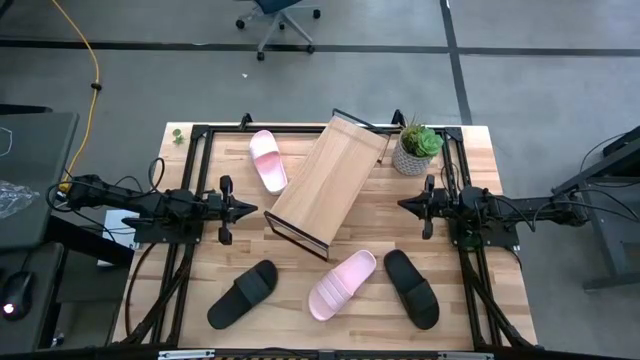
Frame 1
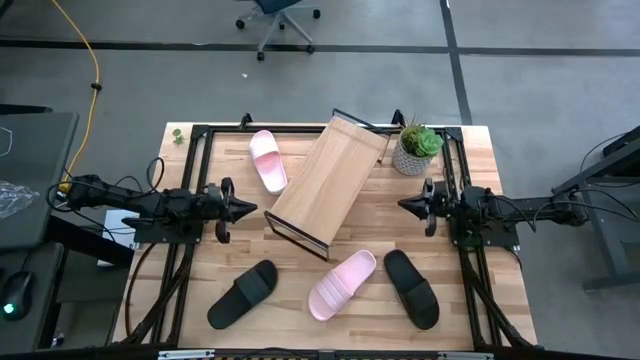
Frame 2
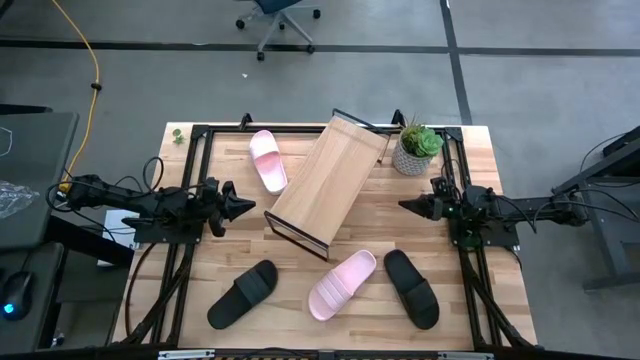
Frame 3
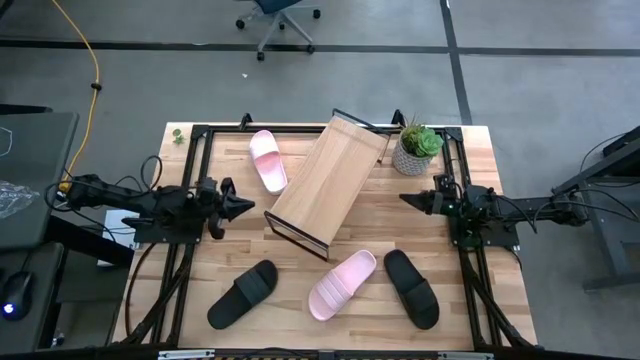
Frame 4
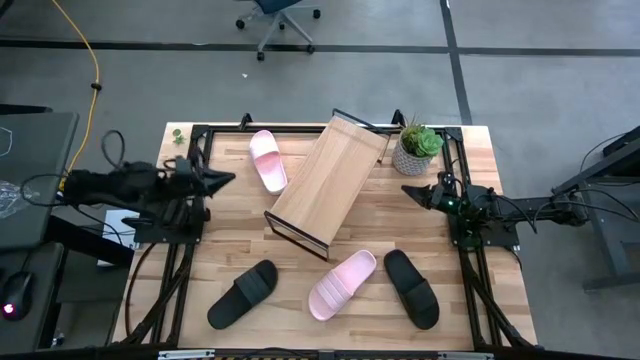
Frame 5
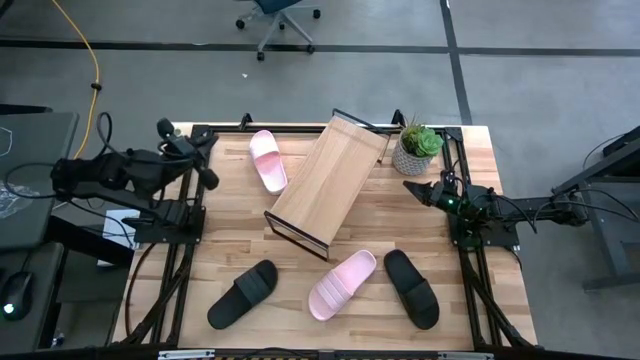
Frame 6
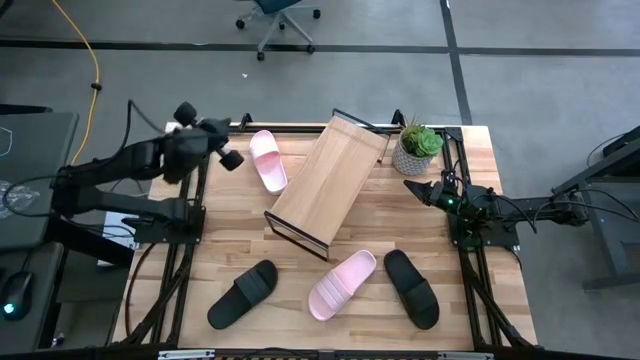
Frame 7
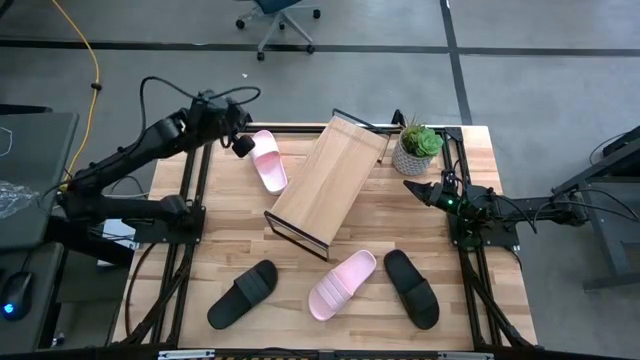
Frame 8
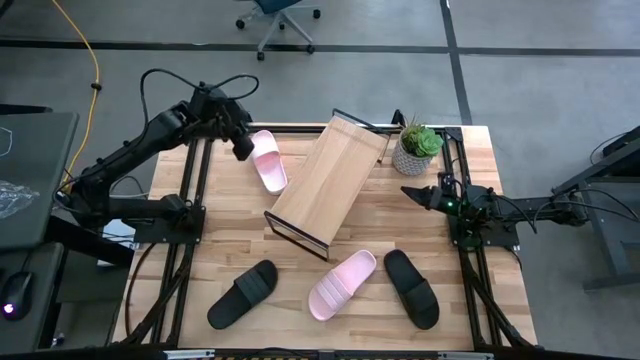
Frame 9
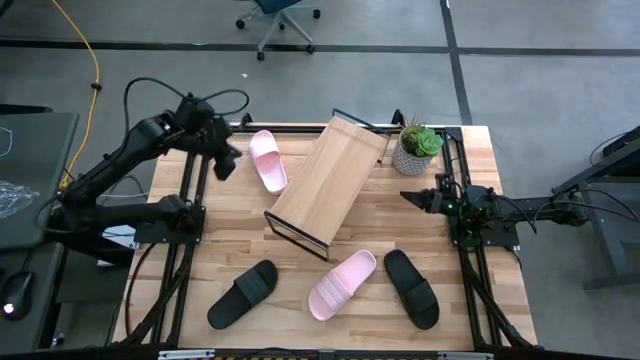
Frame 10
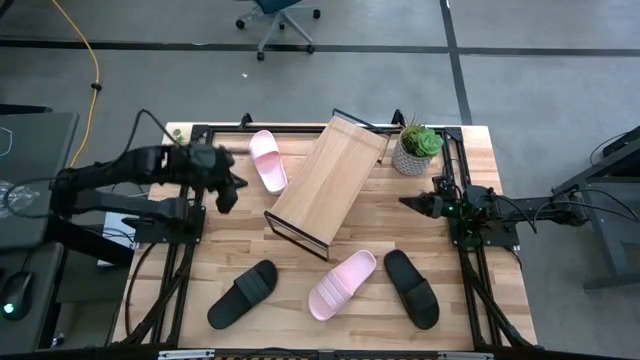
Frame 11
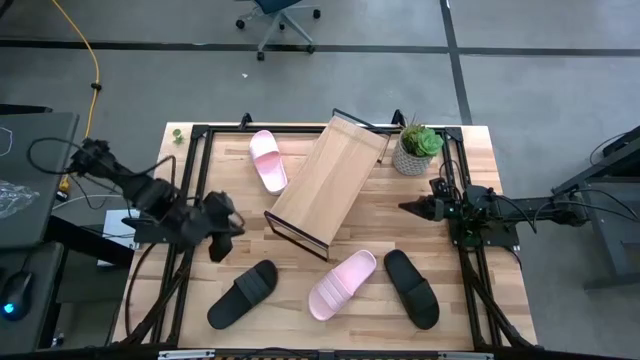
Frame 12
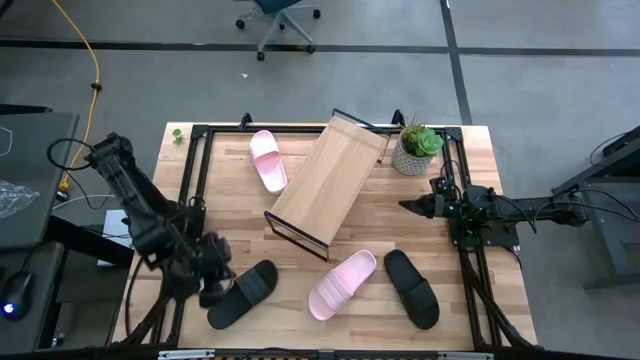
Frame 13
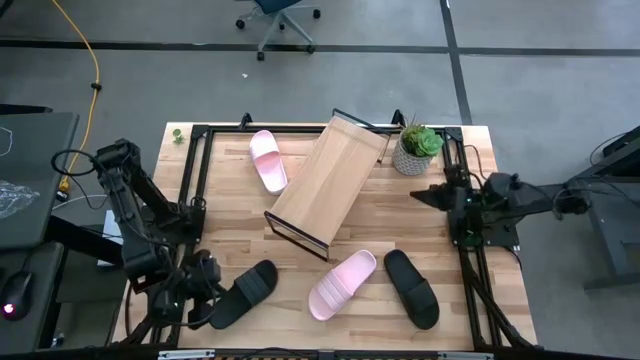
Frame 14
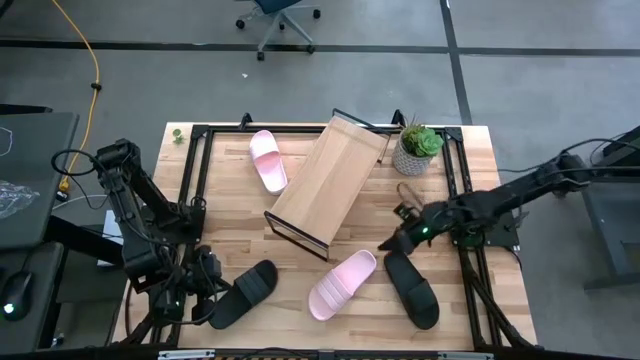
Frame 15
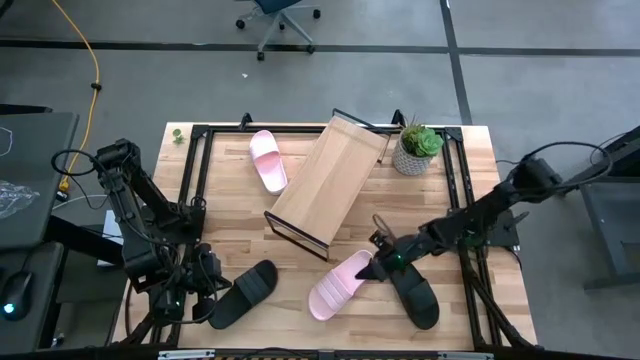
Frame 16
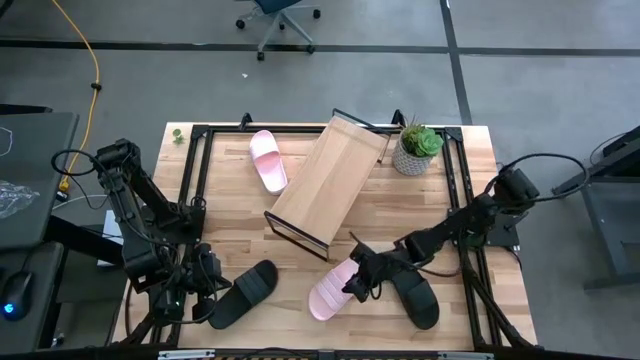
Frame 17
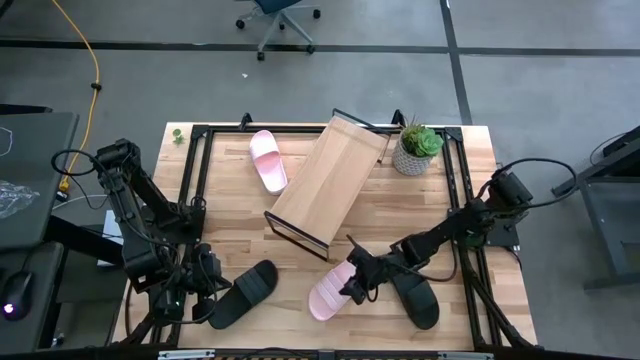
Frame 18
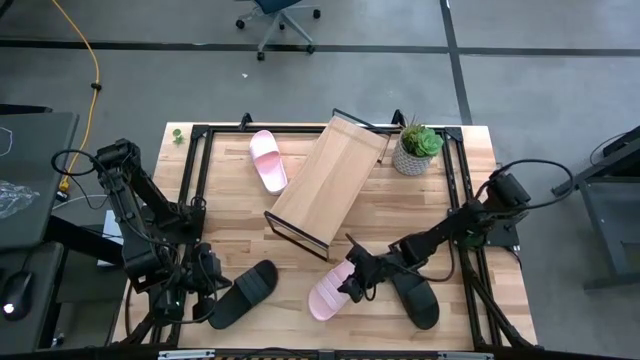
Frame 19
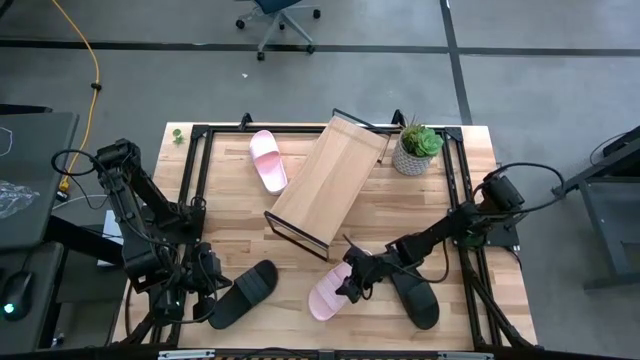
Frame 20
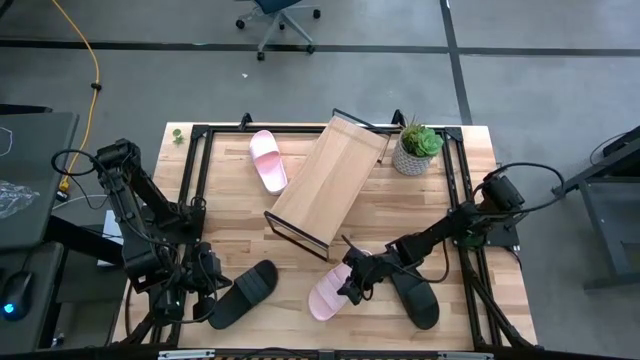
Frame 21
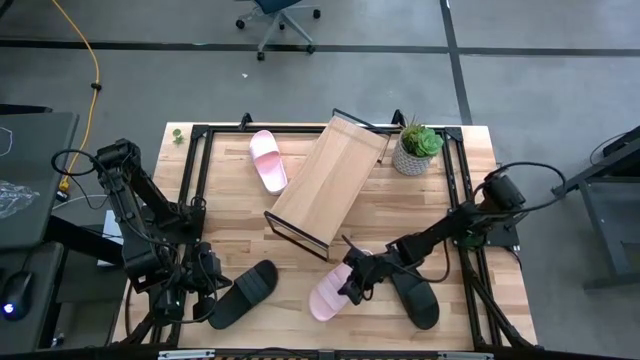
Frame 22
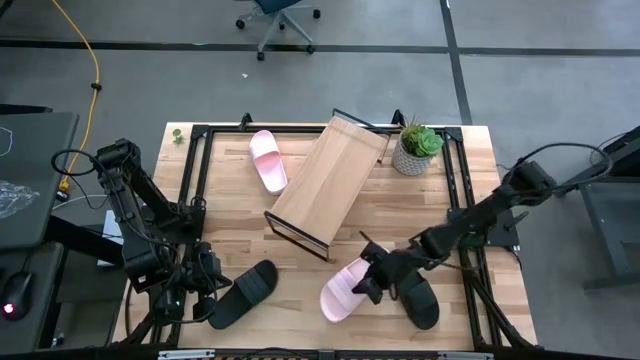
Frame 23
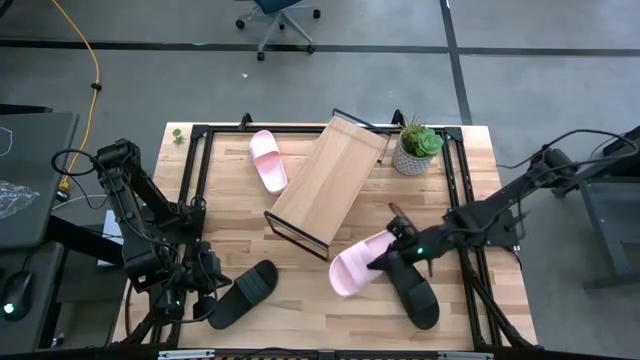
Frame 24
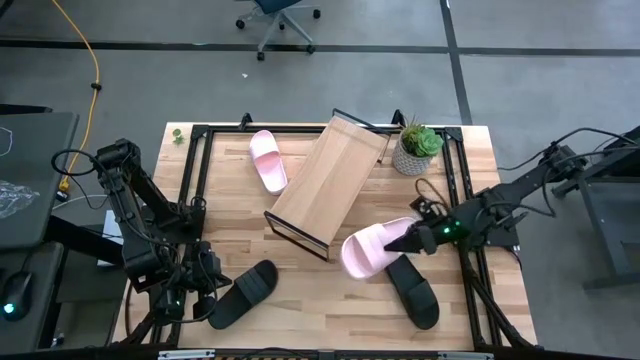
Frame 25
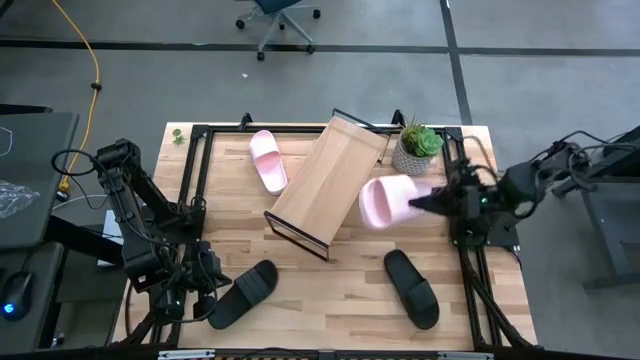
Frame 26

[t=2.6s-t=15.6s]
Task: Pick and place slides into the shelf
Put the bottom pink slide on the shelf

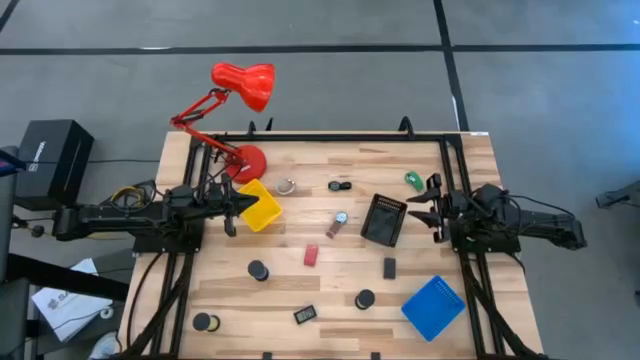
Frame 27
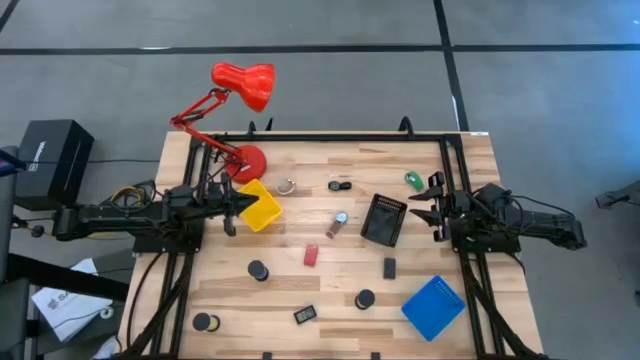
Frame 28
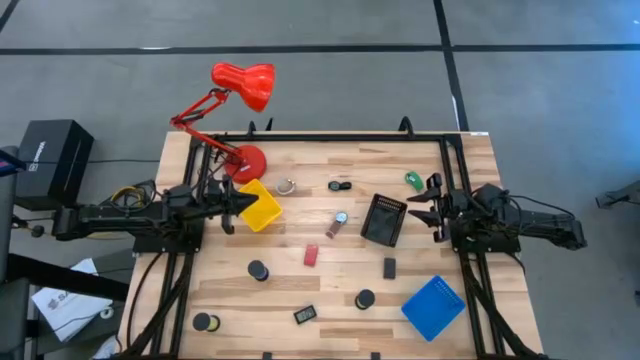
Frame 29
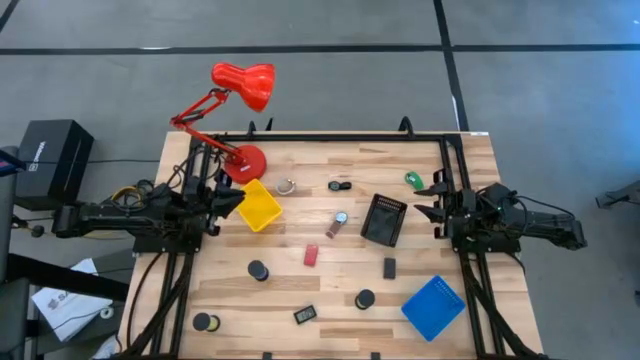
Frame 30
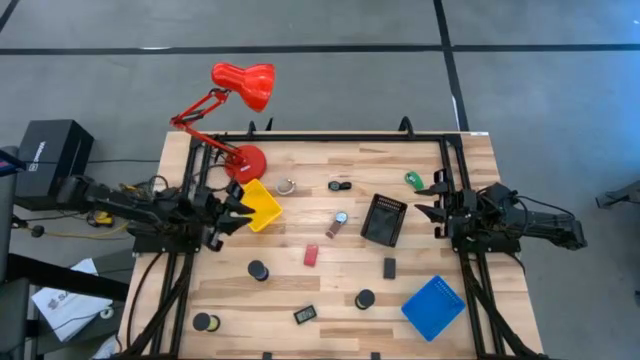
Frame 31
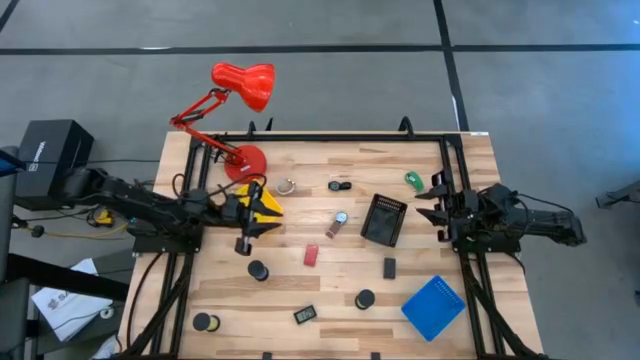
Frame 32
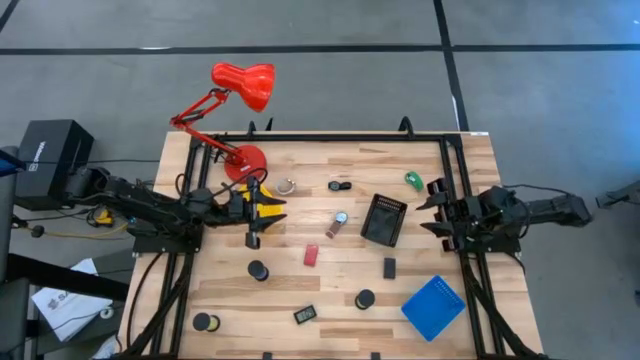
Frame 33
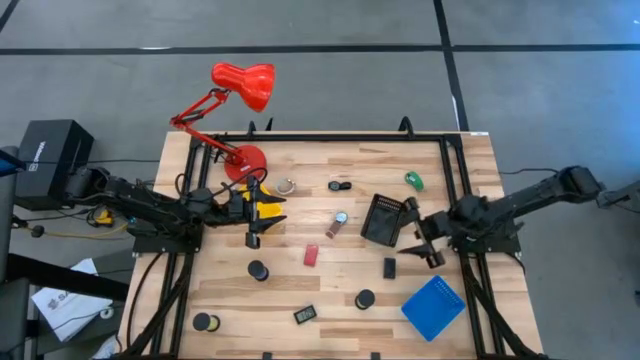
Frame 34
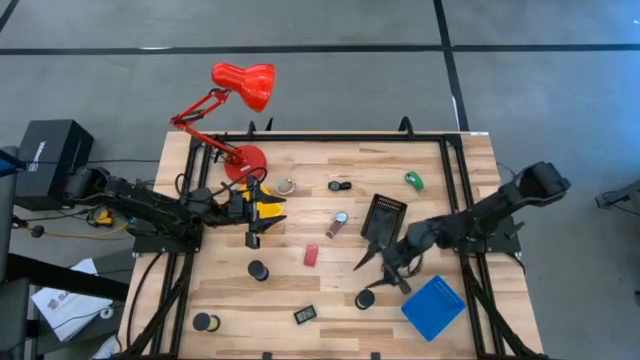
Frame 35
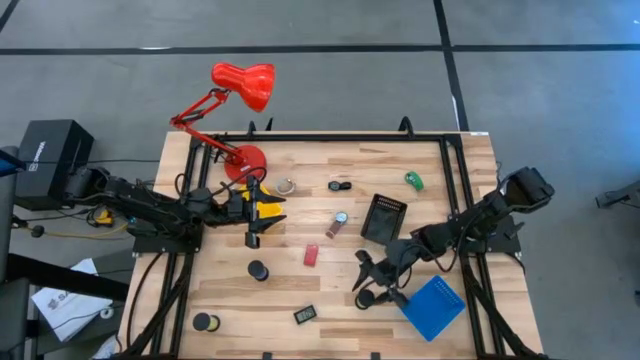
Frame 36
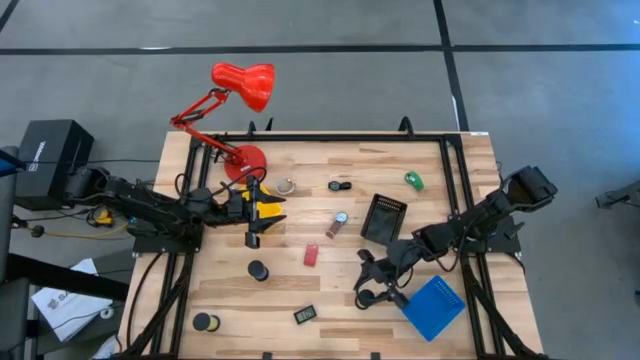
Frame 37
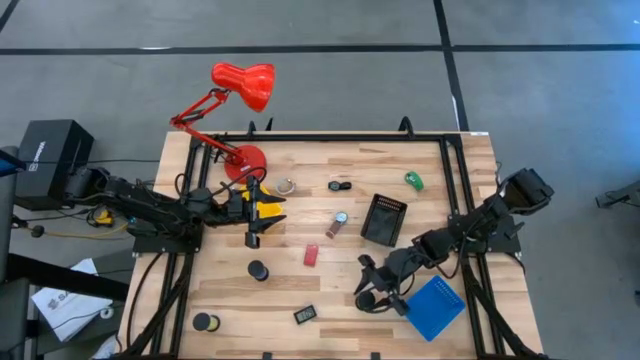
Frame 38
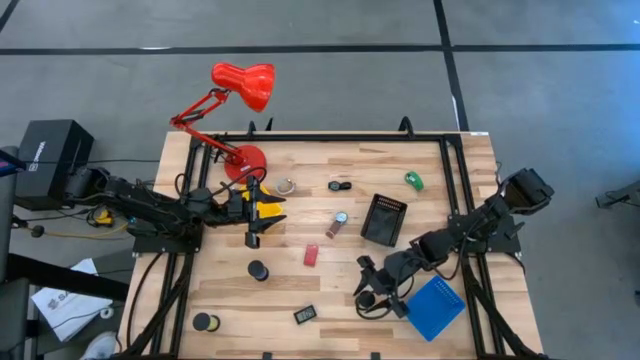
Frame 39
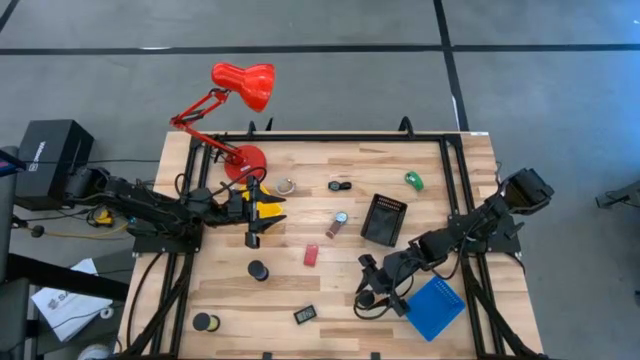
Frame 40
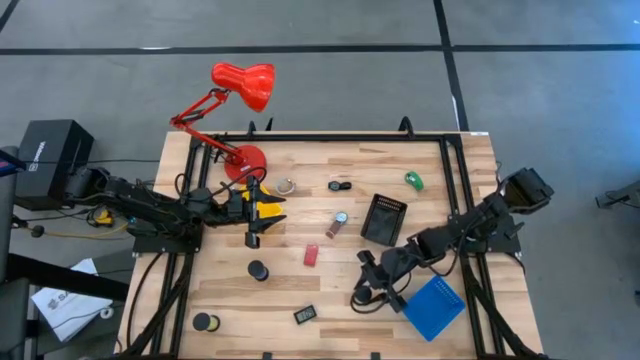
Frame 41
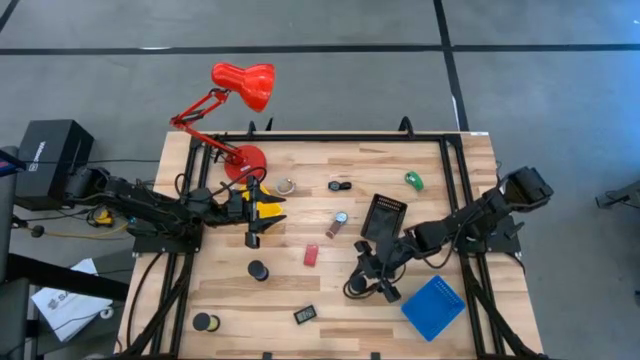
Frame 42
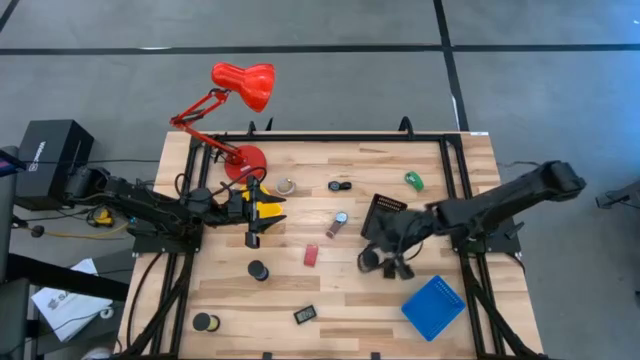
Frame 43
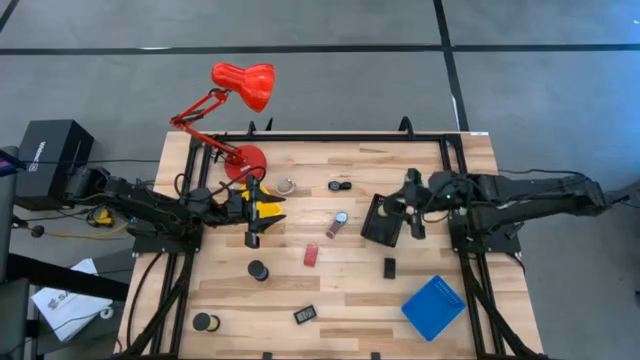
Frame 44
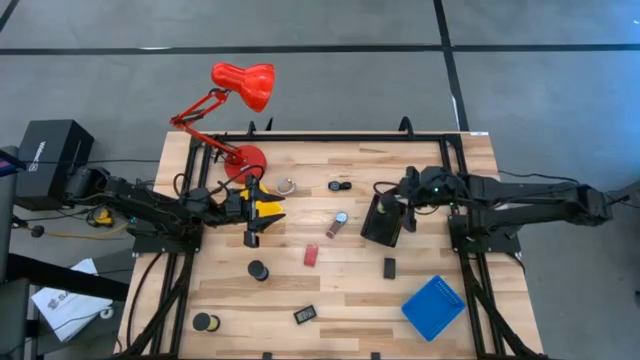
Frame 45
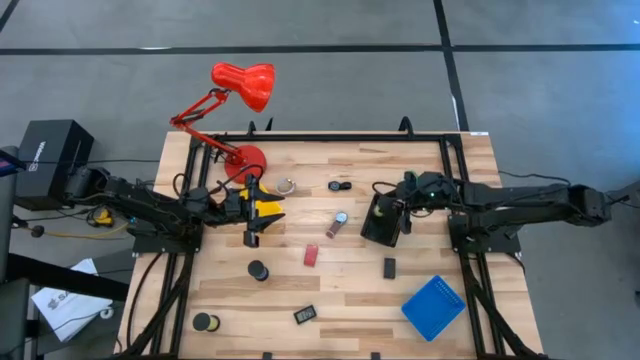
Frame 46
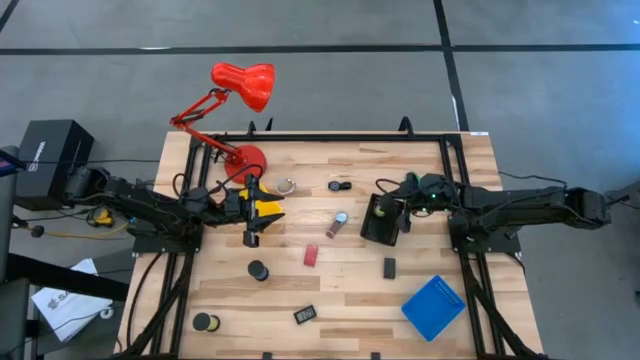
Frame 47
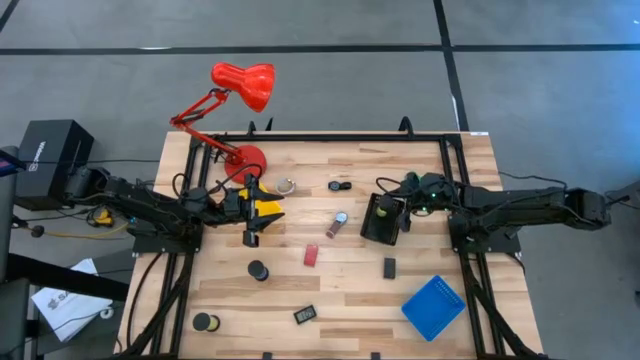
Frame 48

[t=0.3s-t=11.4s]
Task: Pick & Place Office items
Put the right green hourglass into the black bin
